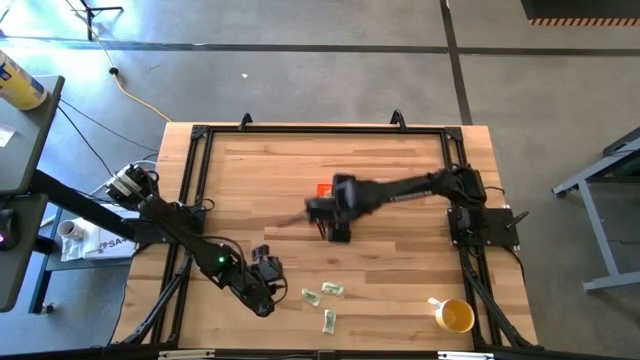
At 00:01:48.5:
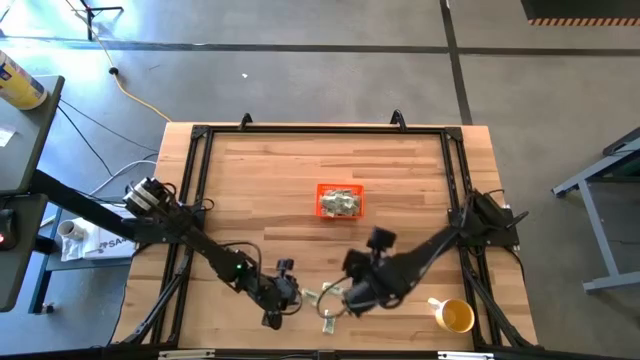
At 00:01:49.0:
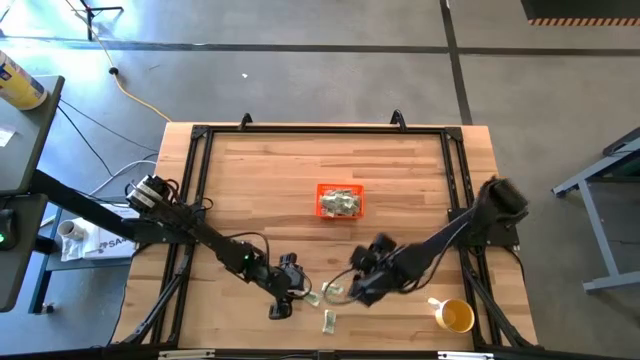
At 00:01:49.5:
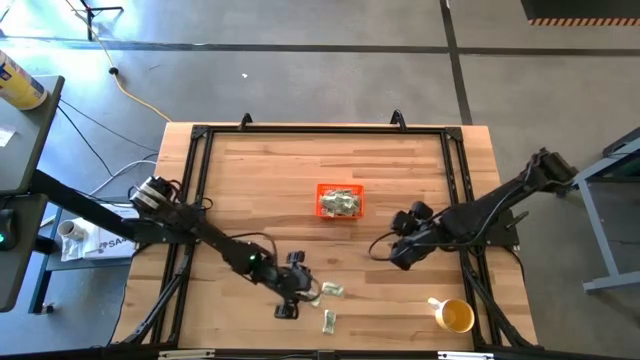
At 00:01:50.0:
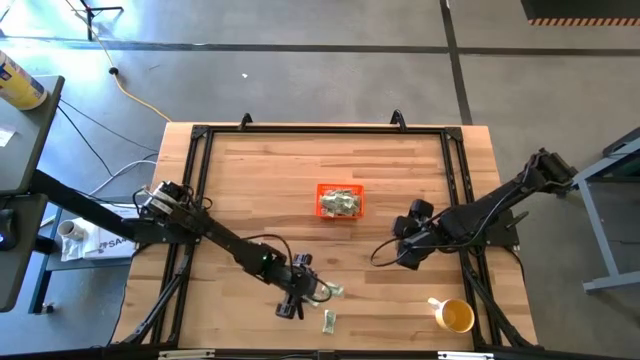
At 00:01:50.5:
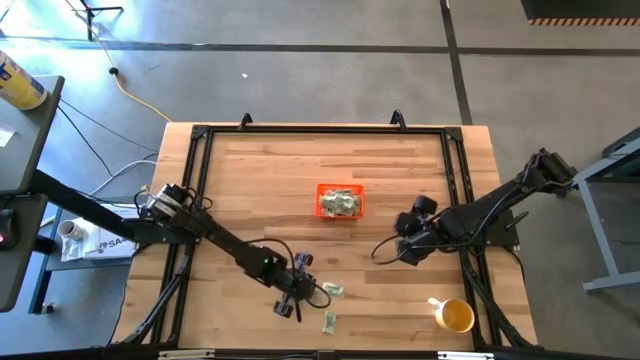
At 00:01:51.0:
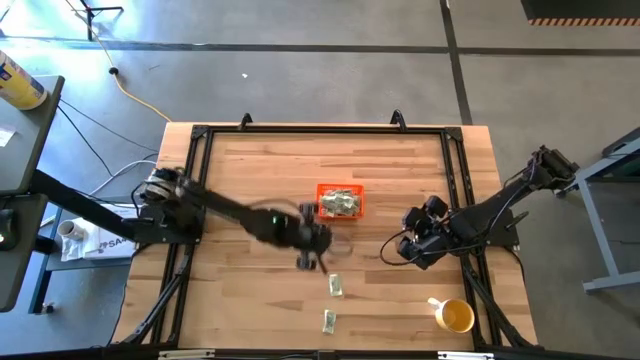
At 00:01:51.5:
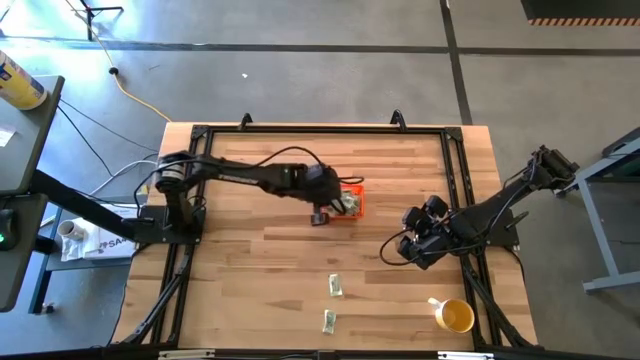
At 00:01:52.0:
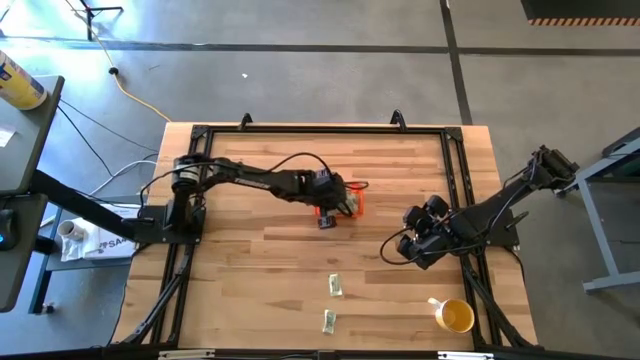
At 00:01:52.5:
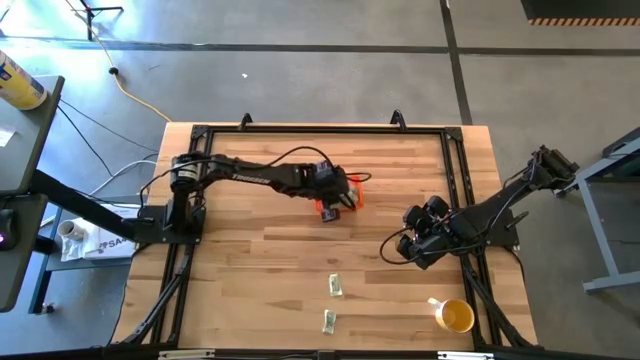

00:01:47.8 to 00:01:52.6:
Task: Pick and place Stevia / Truvia into bins
Put the stevia packet into the orange bin

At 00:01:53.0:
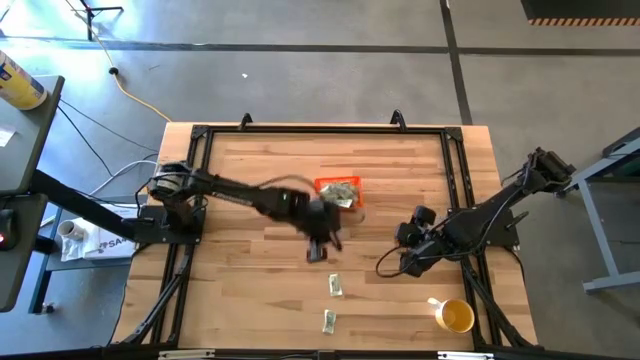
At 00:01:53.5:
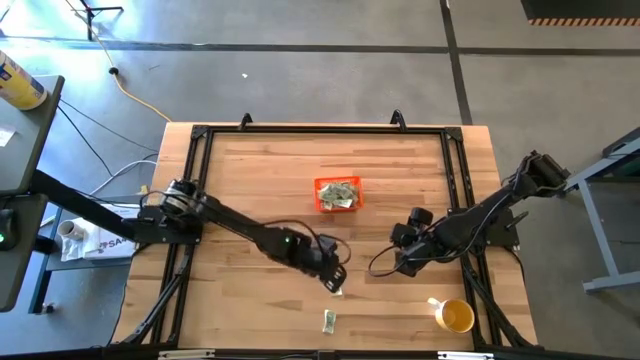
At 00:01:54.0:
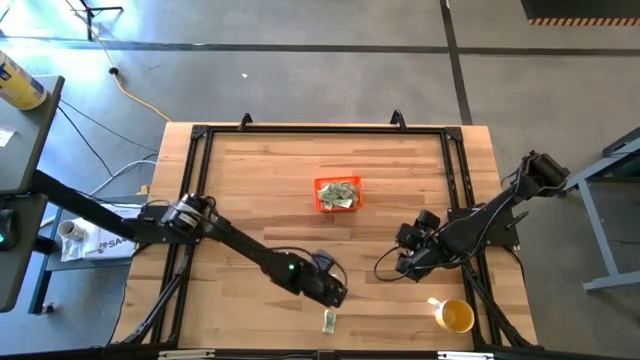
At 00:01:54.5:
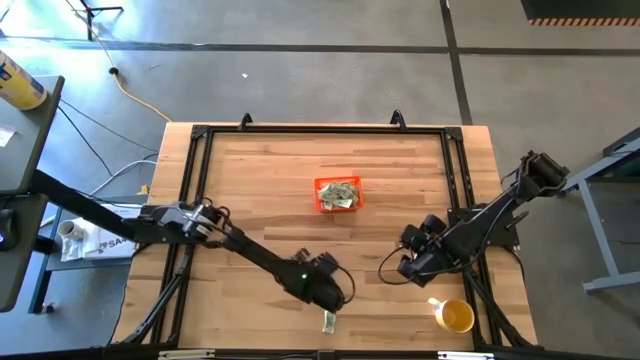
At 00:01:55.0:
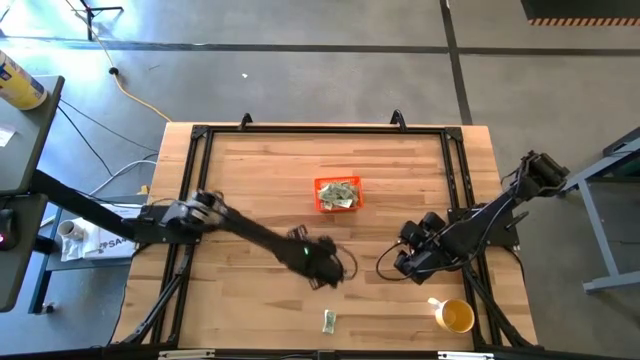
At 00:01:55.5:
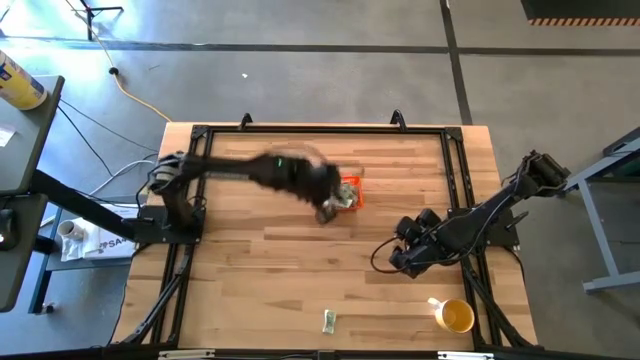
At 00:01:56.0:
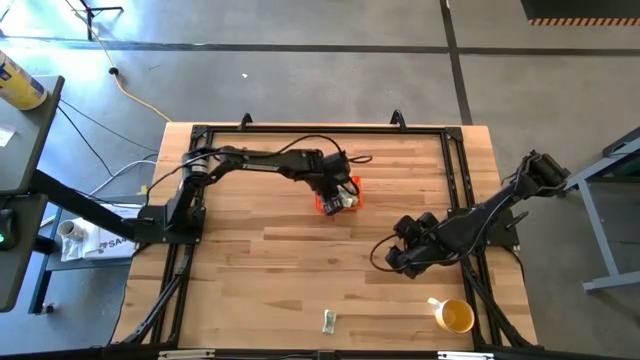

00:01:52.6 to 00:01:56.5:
Put the stevia packet into the orange bin

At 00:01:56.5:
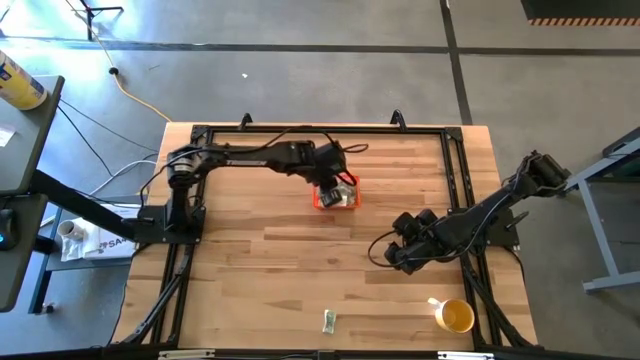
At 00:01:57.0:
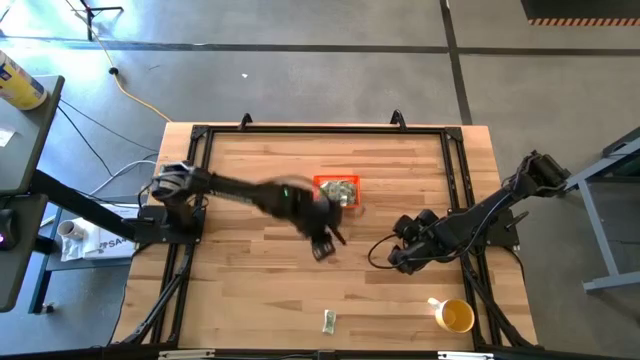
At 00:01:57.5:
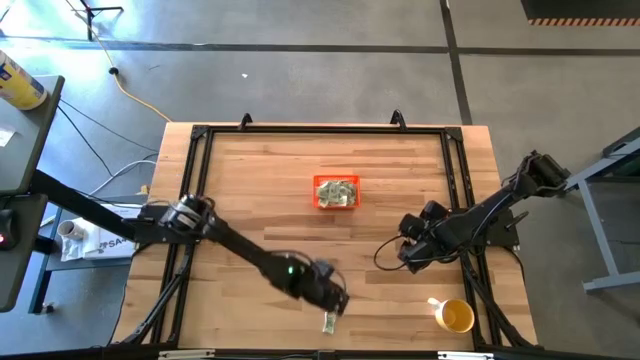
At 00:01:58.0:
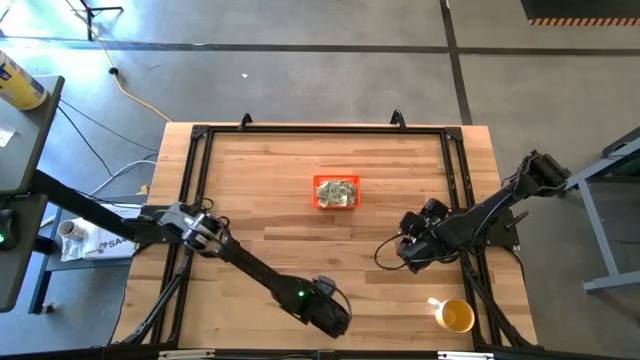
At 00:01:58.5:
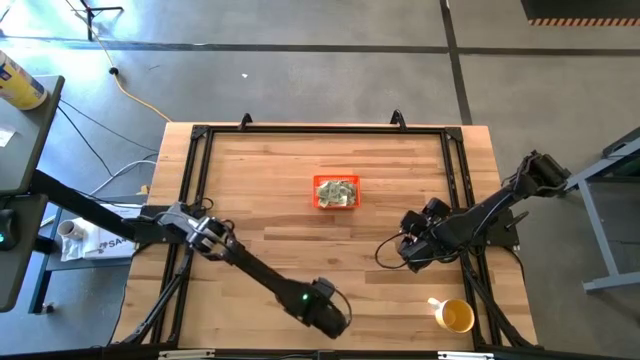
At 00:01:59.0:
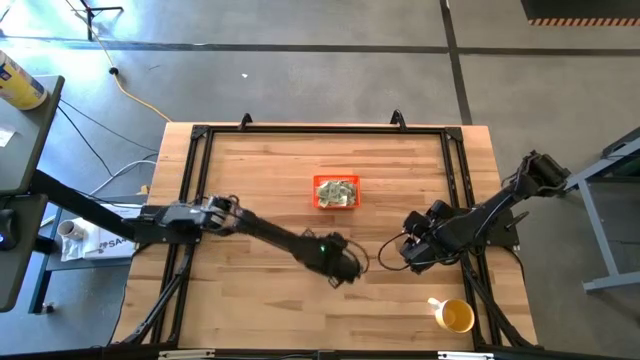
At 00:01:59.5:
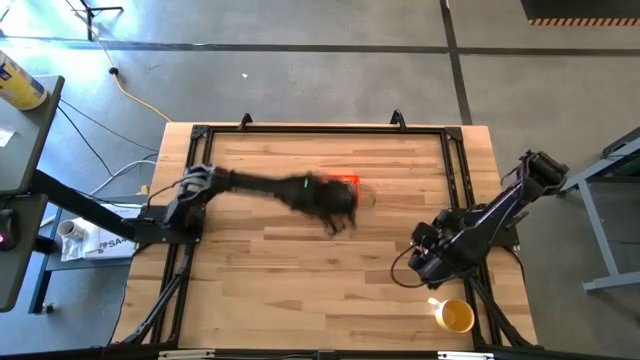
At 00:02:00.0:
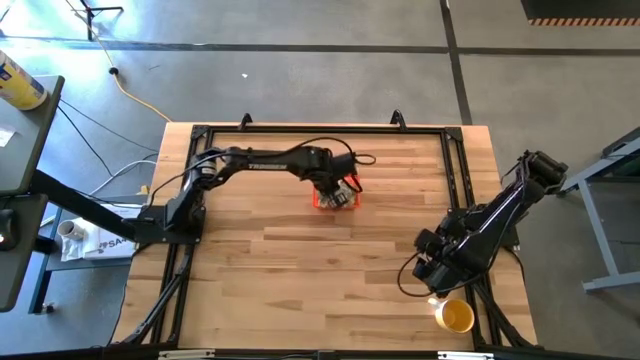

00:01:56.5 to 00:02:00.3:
Put the stevia packet into the orange bin

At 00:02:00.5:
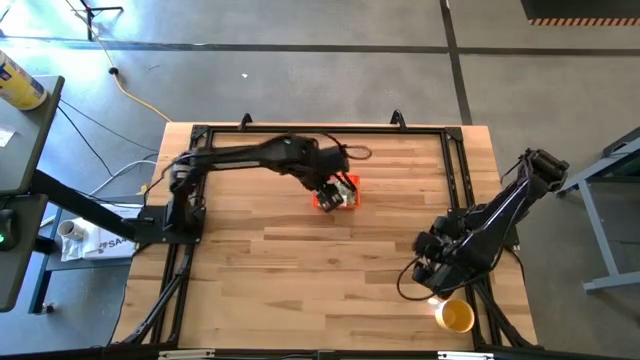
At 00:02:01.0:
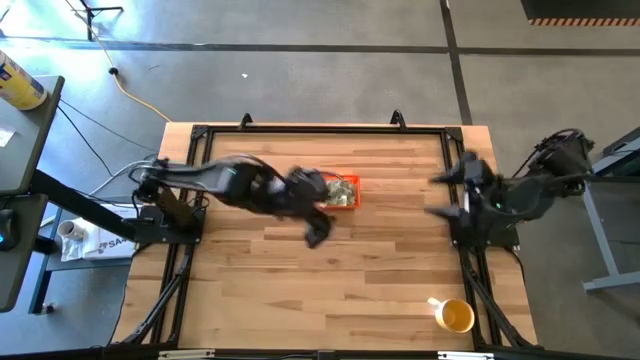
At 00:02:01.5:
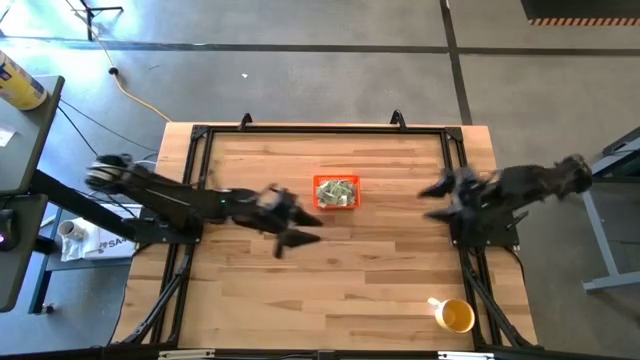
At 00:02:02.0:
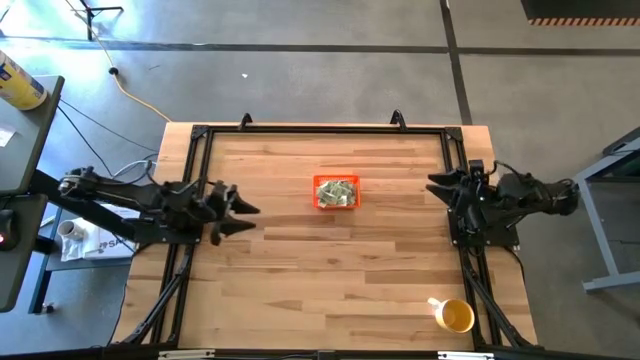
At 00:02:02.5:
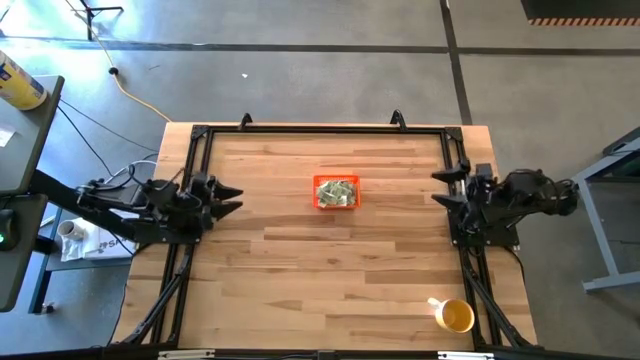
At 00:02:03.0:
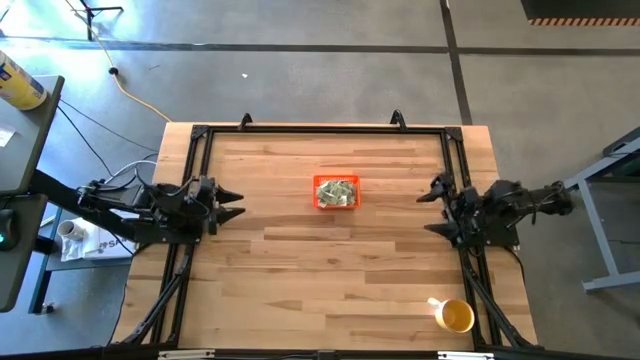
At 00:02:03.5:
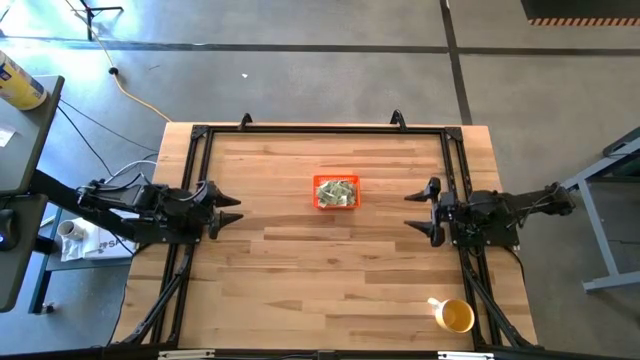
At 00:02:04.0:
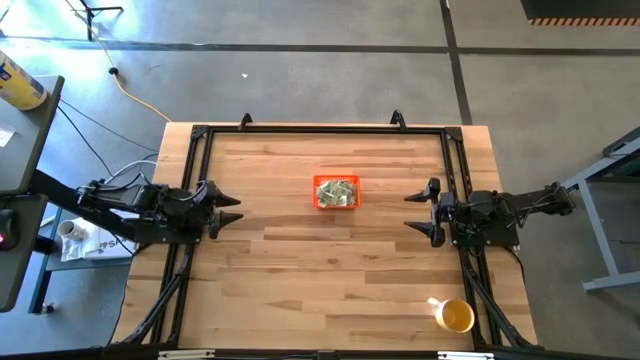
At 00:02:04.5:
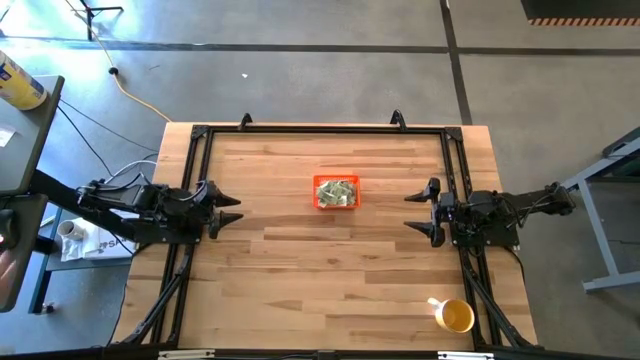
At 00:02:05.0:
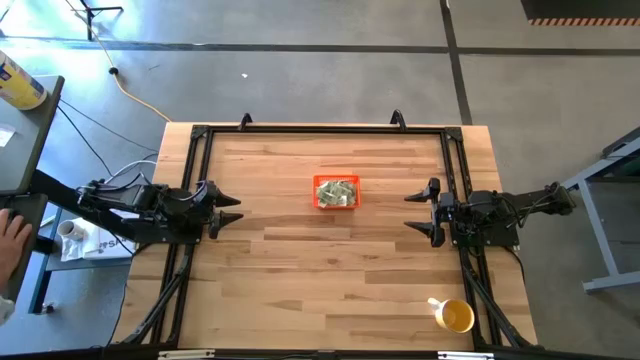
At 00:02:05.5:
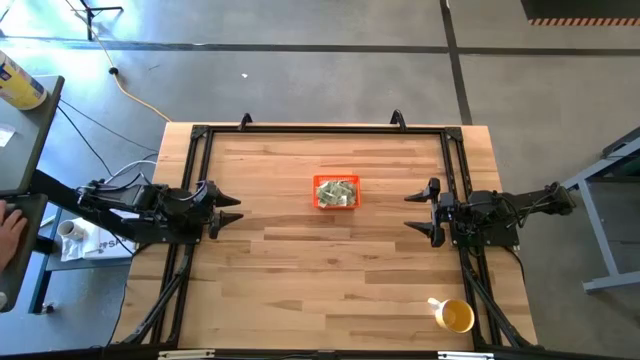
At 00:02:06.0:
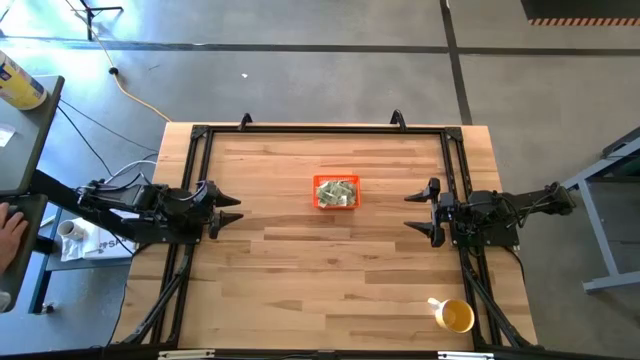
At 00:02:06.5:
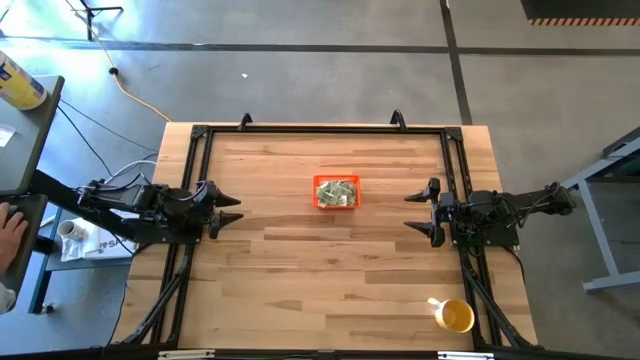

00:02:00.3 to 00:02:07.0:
Return to Home Position

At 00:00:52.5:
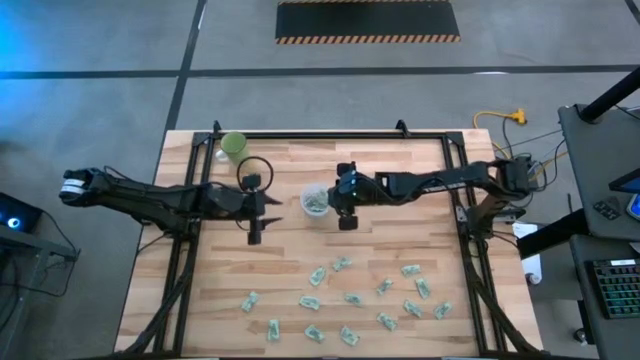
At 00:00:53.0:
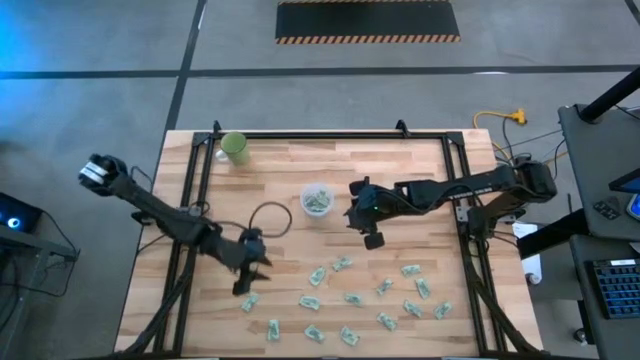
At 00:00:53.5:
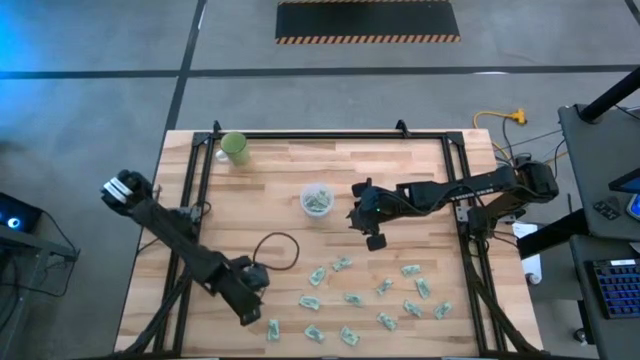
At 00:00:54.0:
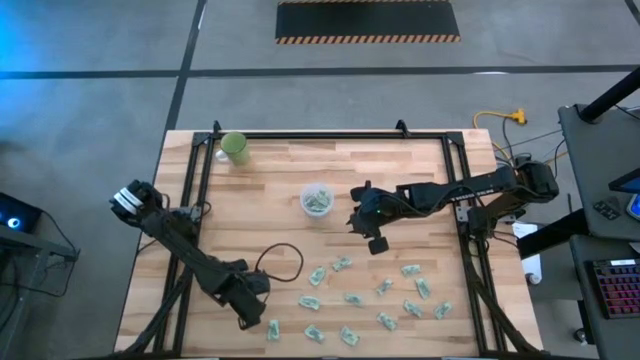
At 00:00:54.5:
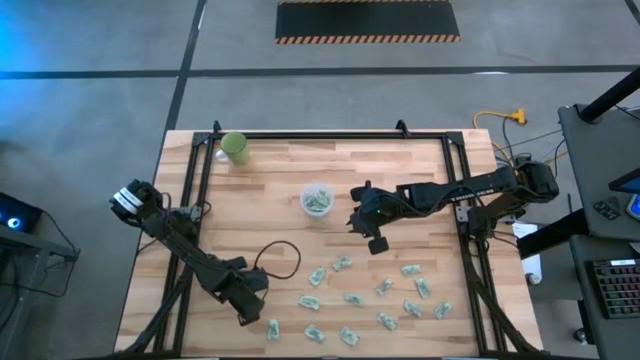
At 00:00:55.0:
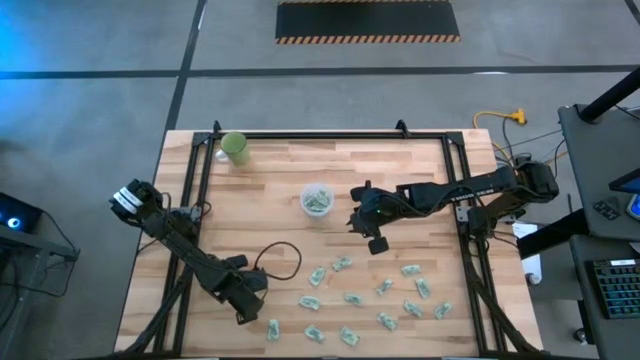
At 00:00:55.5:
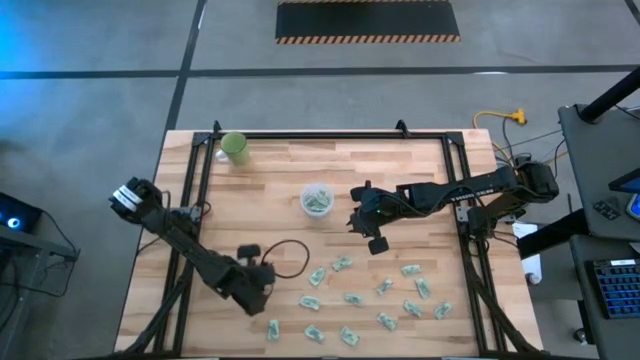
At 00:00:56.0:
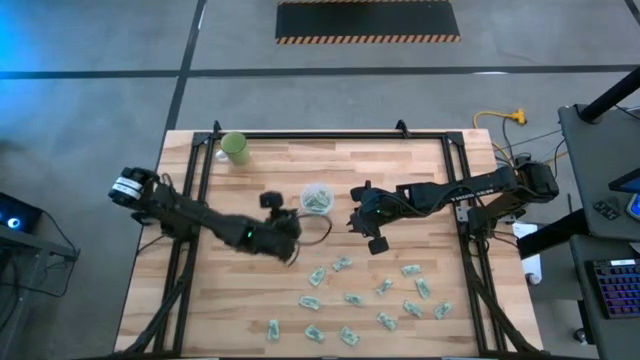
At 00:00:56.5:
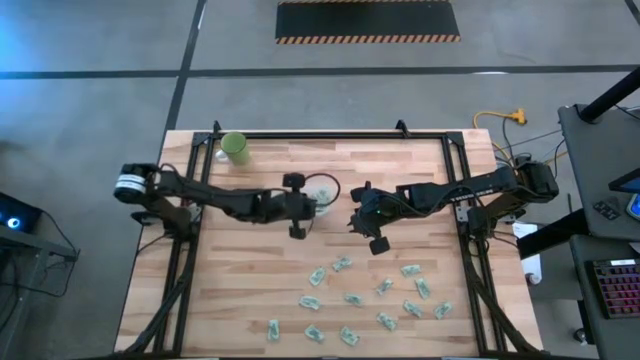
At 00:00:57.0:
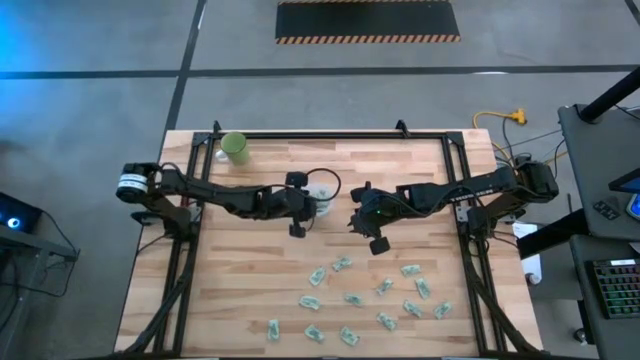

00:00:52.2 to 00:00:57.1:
Task: Pick and place Stevia / Truvia into bins
Put the green stevia packet into the transparent container
